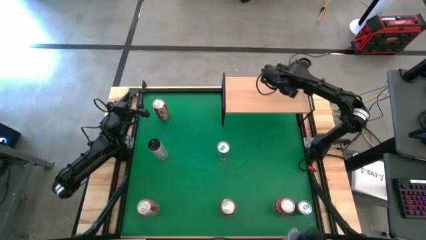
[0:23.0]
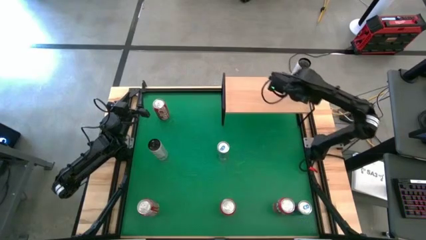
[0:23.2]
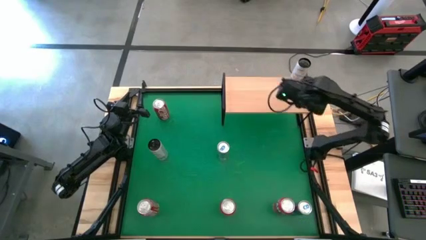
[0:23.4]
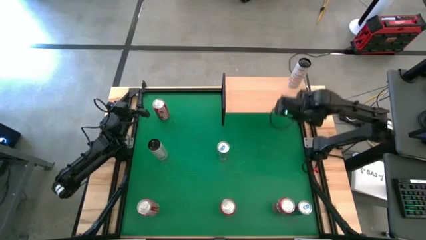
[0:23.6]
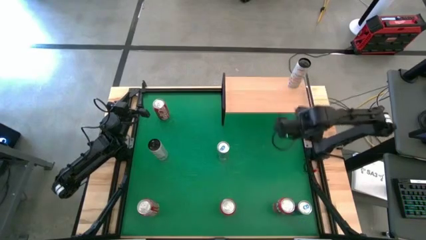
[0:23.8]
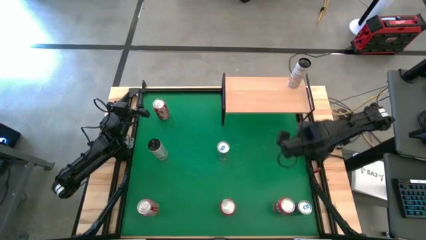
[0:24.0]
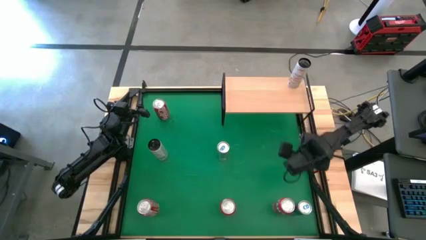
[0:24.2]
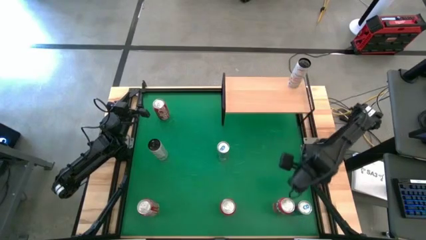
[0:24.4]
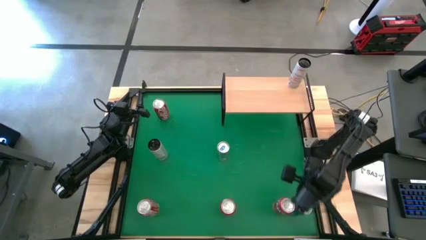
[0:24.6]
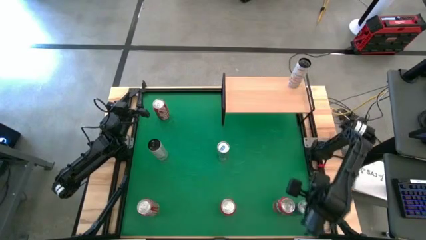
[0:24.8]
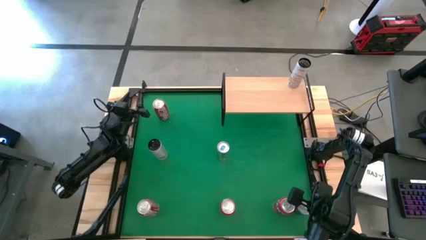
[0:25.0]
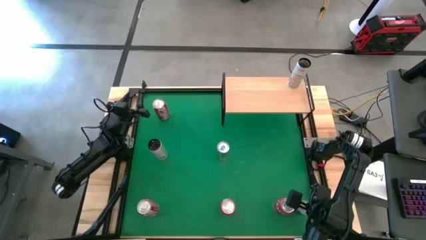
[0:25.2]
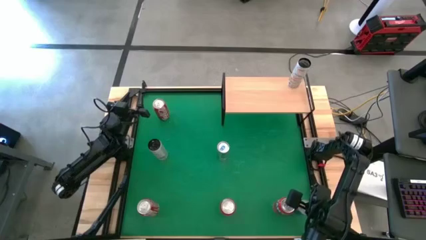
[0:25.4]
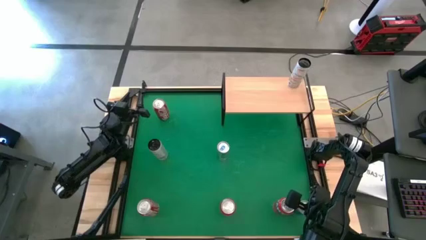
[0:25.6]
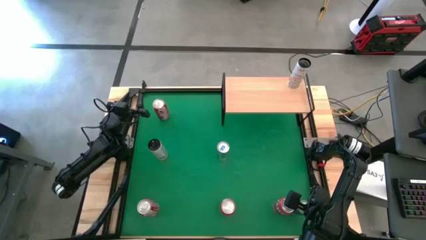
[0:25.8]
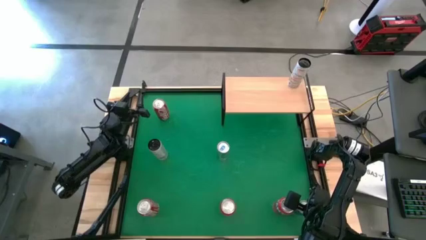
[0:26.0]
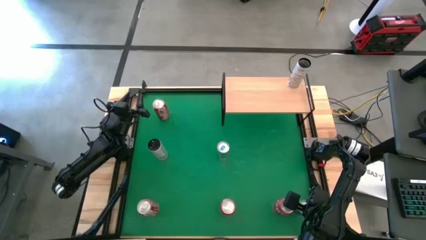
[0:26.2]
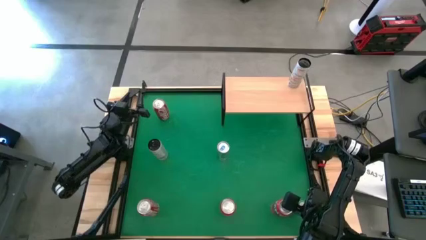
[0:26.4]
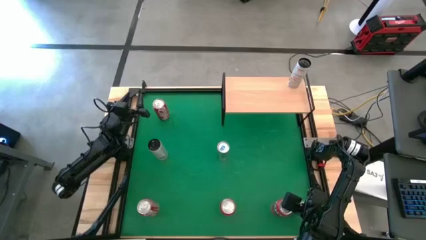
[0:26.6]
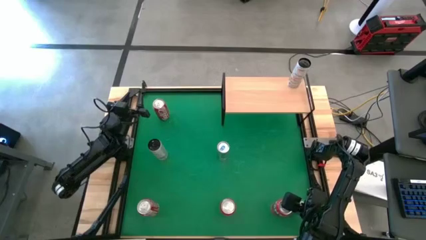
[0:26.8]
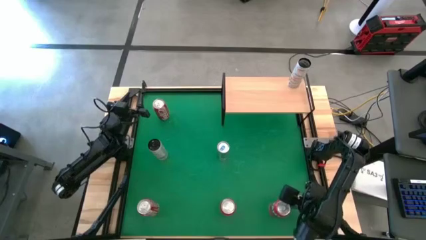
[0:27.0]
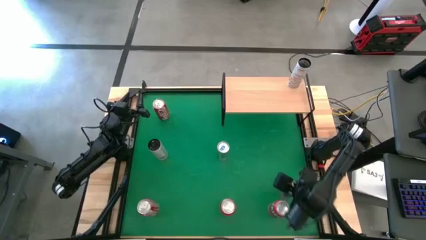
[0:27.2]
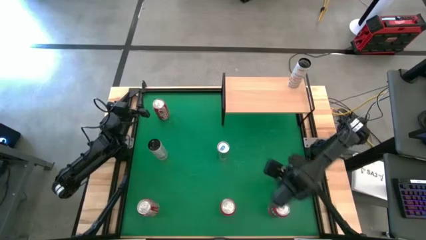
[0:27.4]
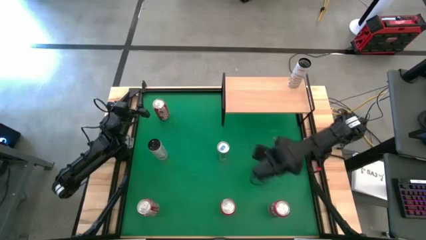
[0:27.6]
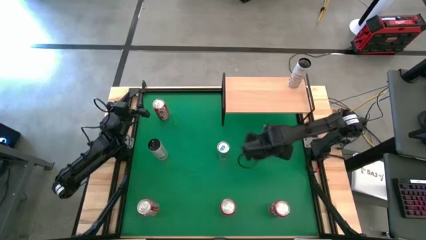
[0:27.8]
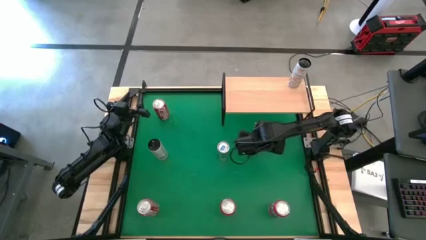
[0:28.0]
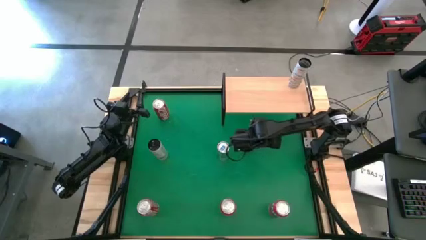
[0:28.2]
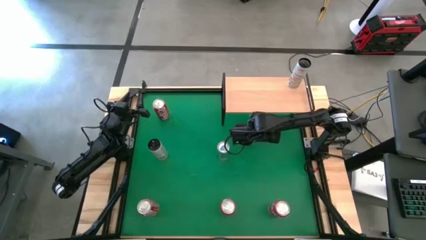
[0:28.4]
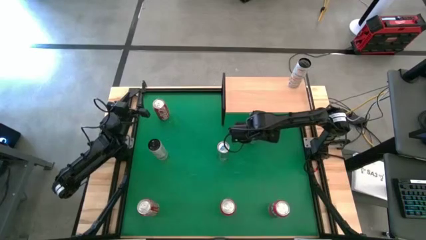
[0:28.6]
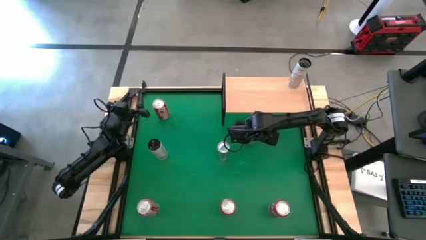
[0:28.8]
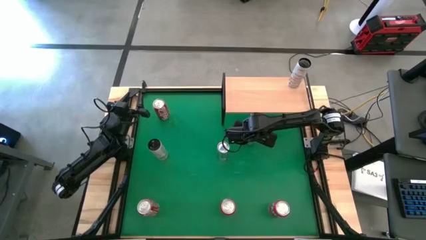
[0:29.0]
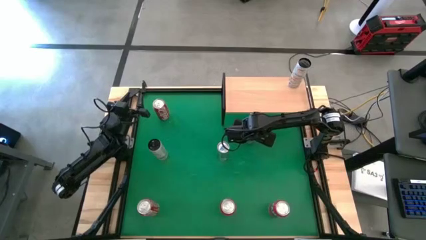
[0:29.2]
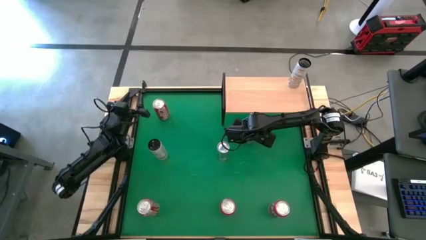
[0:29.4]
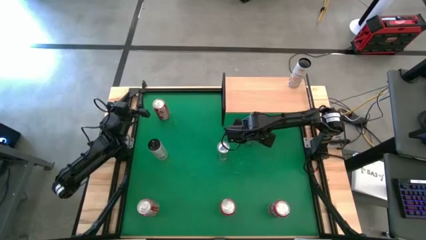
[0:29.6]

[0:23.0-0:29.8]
Task: Place canned beverage on shelf
Move the blue soda can to the center of the table

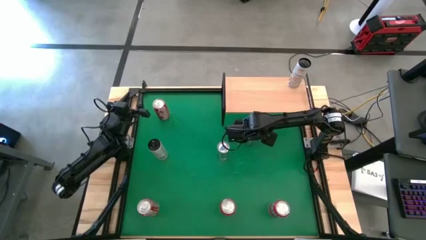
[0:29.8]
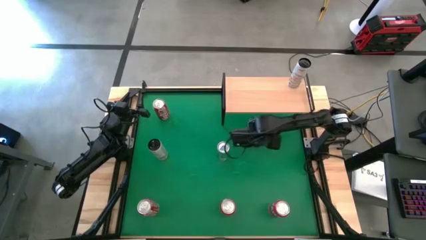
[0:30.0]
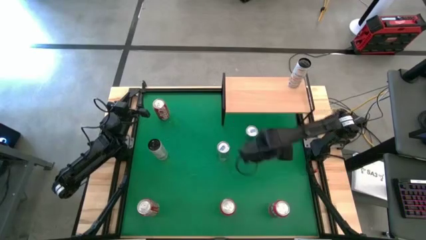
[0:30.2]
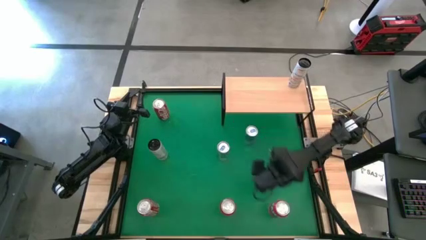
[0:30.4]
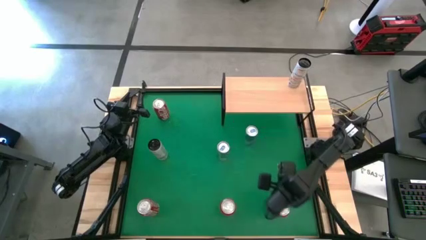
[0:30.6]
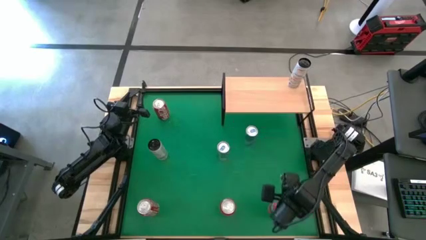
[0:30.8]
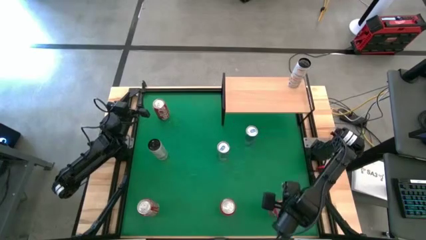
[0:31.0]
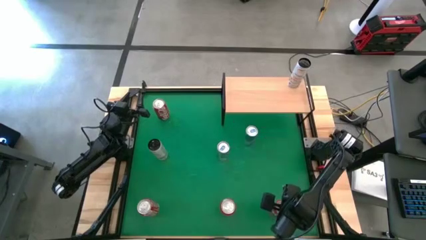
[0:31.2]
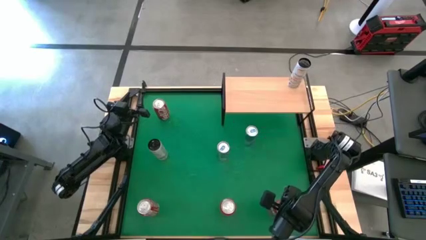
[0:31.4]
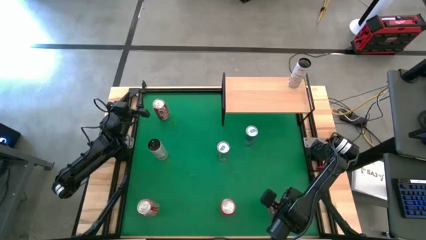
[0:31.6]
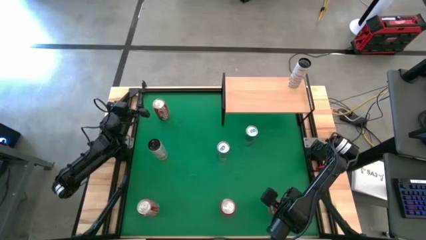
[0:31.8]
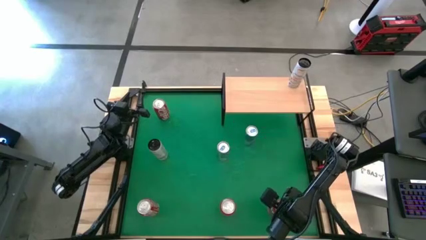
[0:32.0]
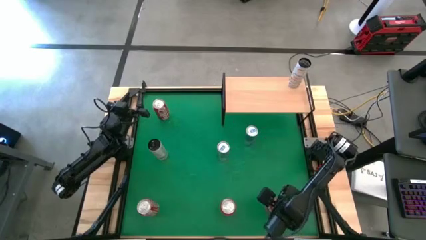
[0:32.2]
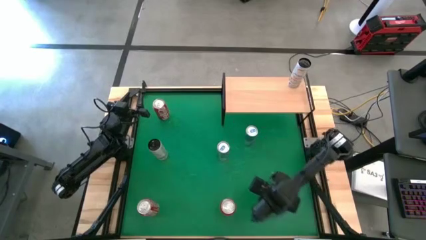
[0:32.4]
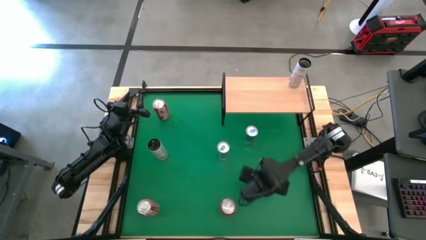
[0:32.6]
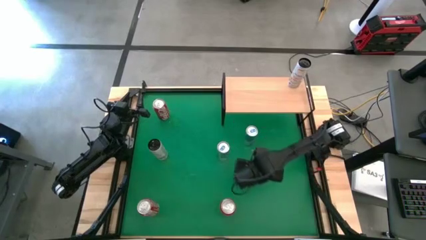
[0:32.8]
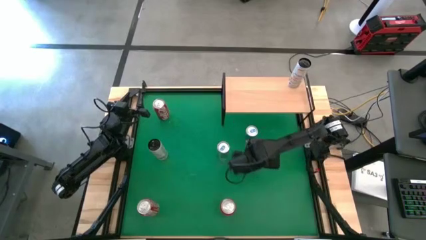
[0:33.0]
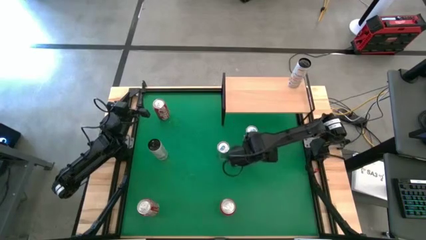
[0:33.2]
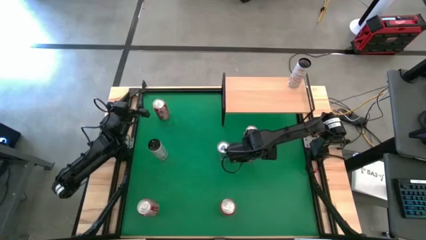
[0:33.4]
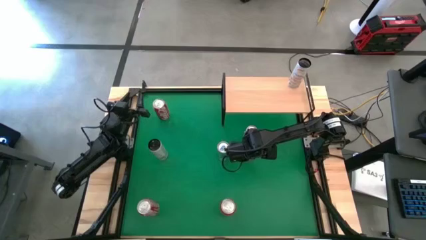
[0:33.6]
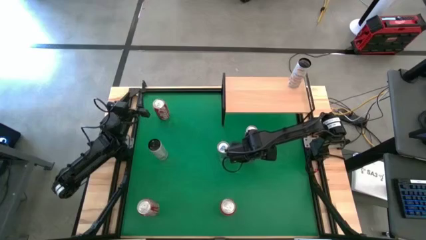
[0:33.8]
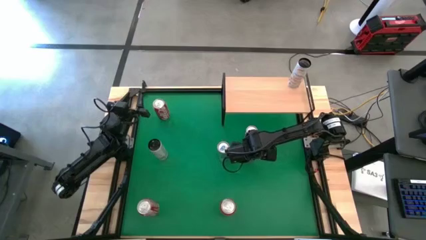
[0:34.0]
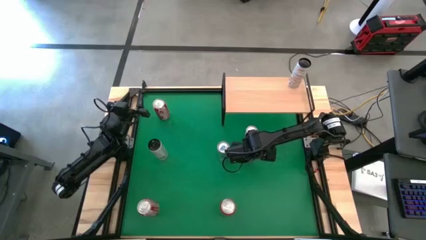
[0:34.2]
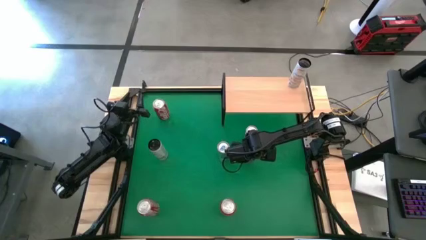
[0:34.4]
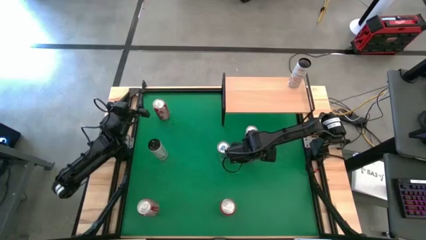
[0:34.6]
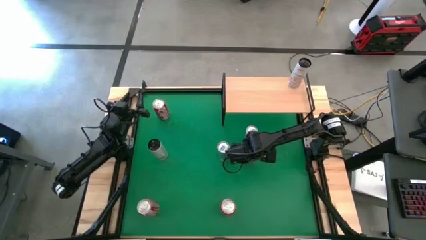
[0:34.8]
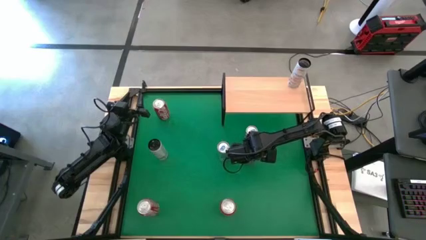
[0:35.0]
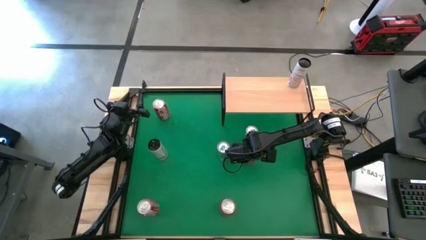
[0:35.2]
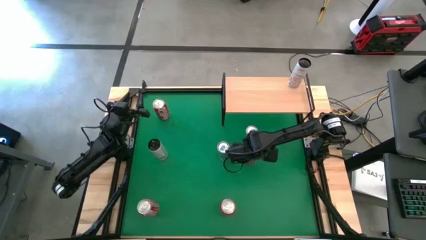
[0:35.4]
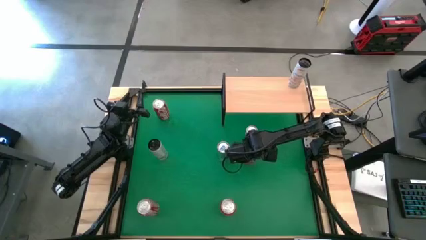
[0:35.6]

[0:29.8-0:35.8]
Move the right red soda can to the center of the table
